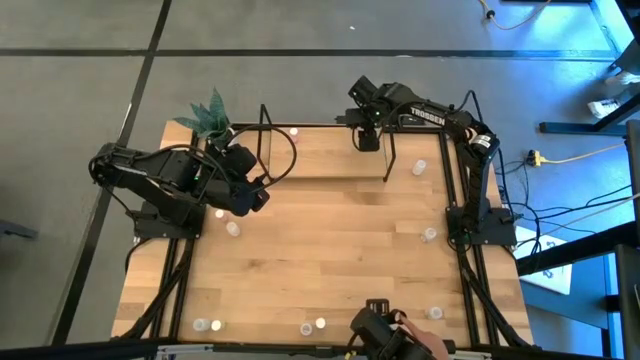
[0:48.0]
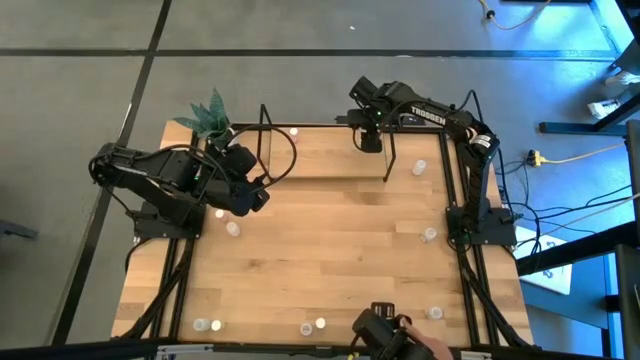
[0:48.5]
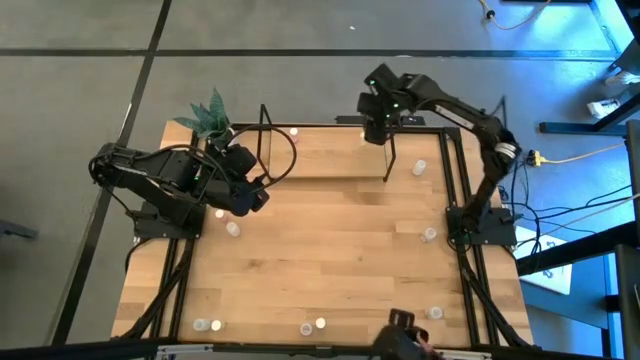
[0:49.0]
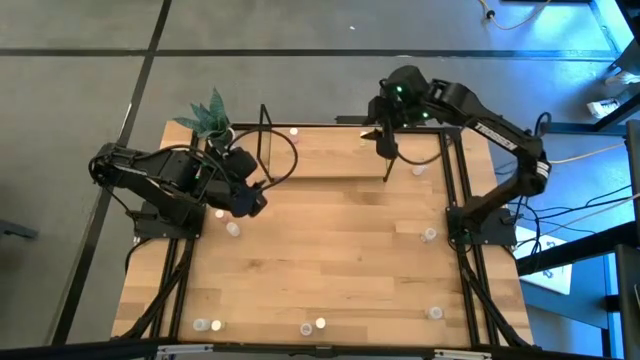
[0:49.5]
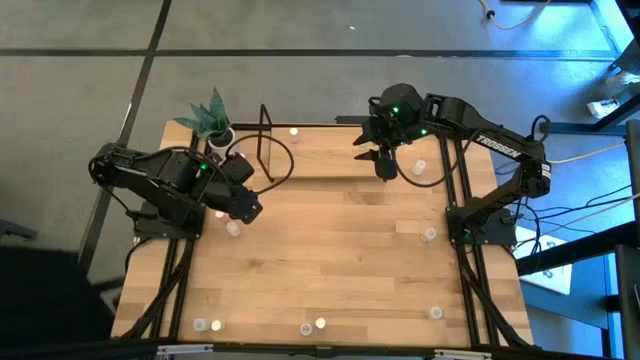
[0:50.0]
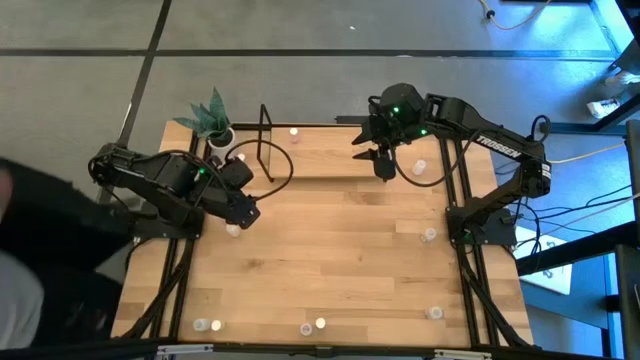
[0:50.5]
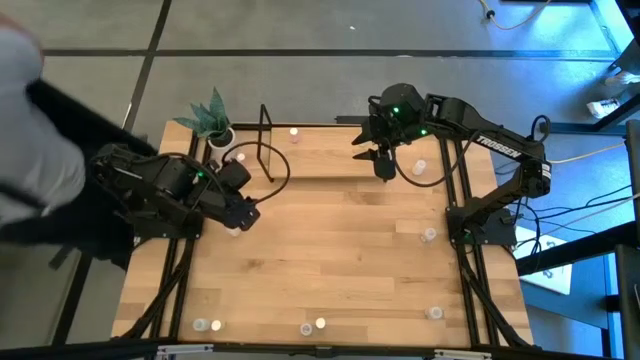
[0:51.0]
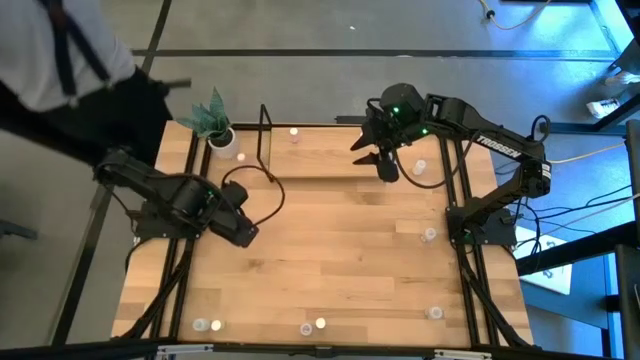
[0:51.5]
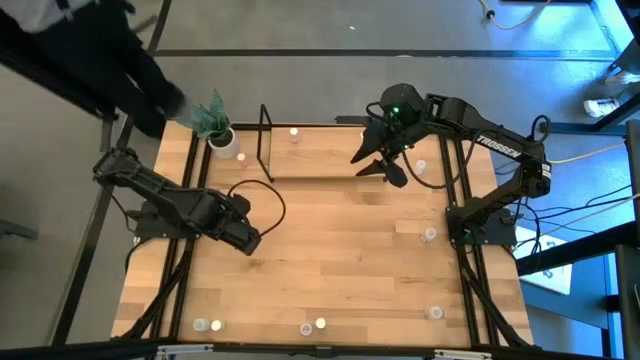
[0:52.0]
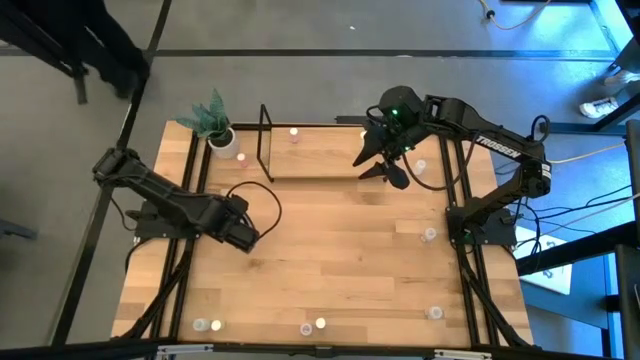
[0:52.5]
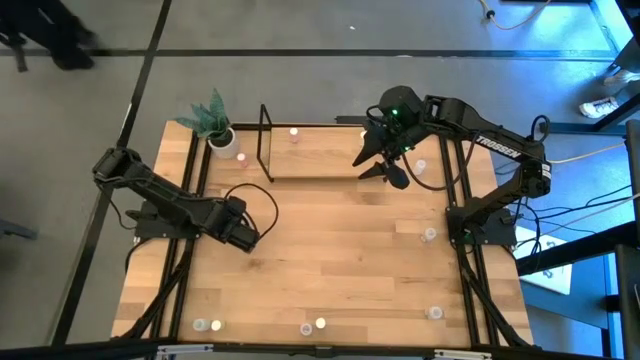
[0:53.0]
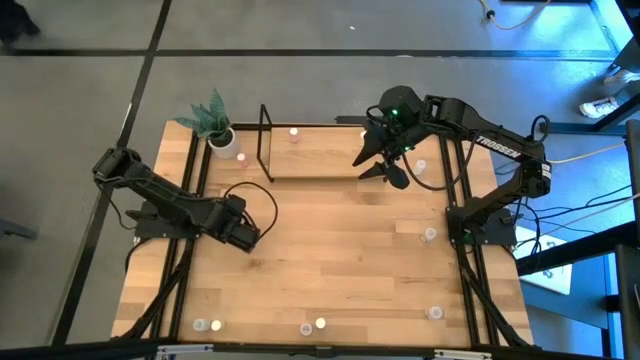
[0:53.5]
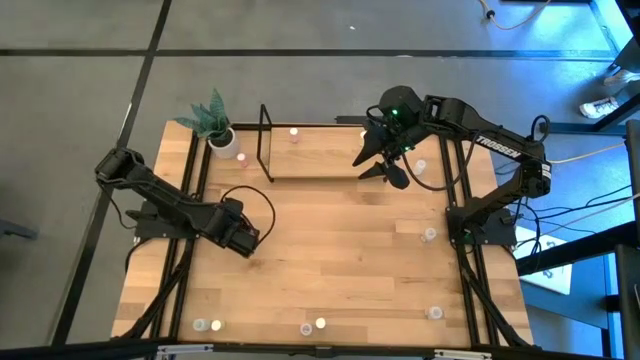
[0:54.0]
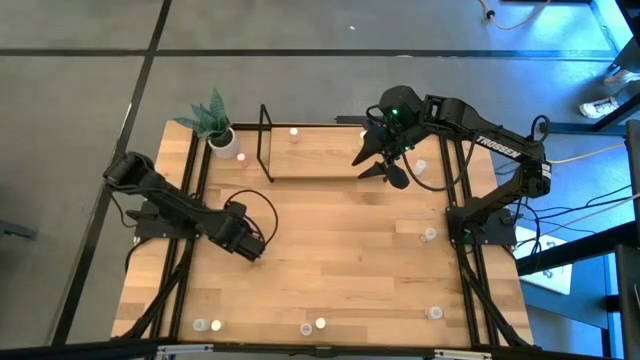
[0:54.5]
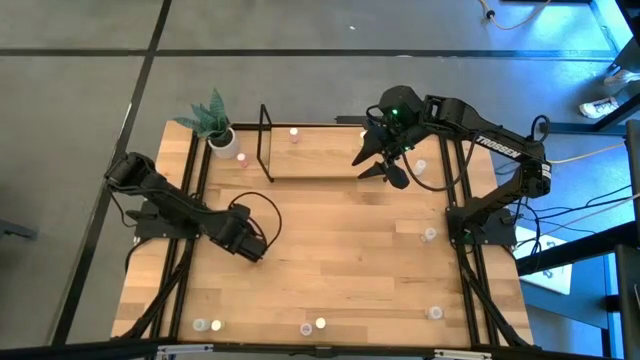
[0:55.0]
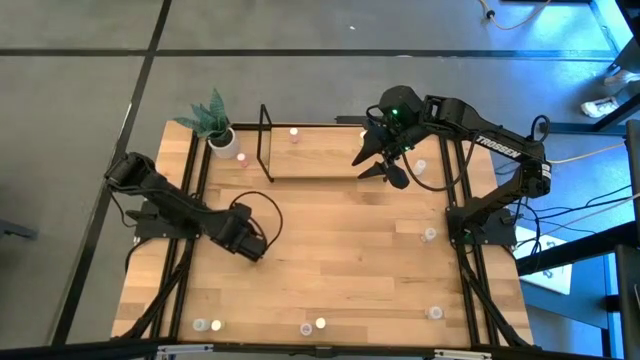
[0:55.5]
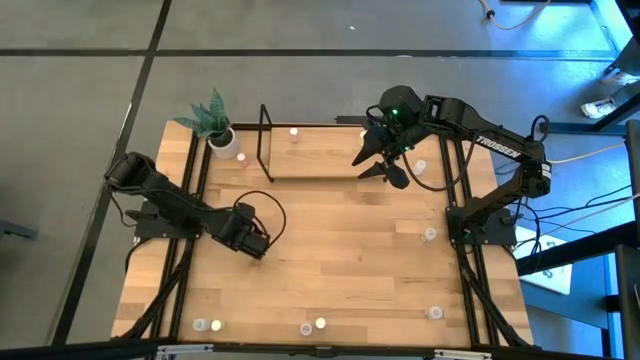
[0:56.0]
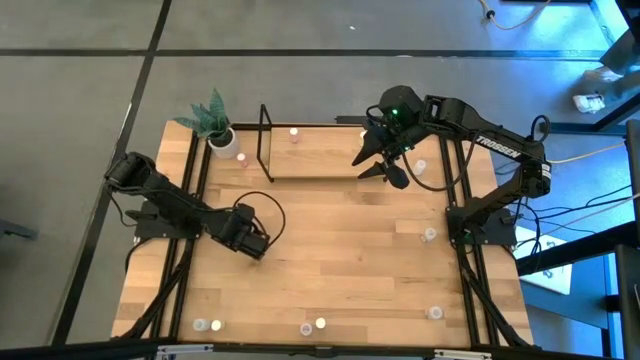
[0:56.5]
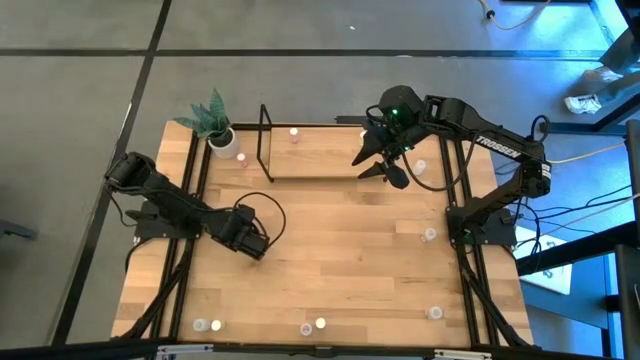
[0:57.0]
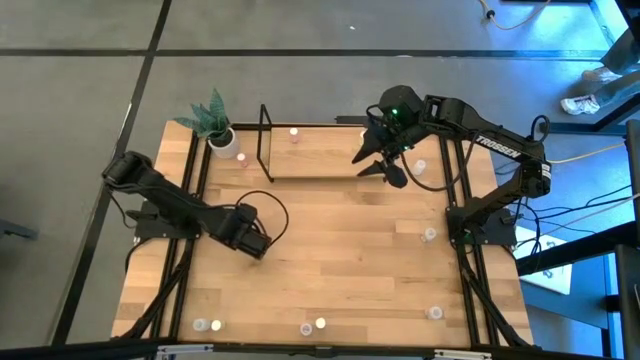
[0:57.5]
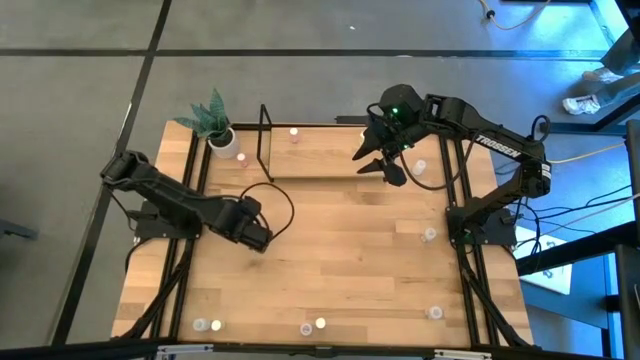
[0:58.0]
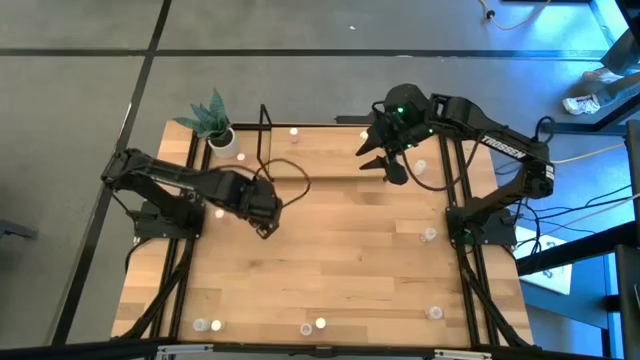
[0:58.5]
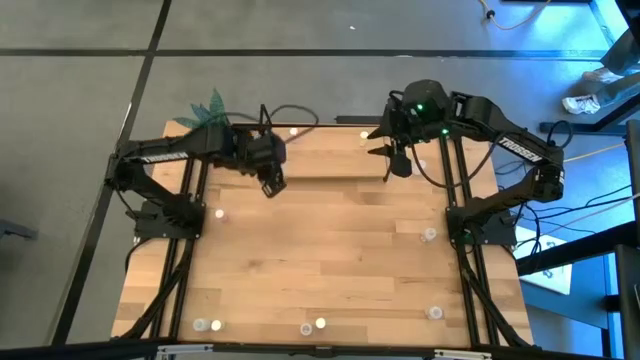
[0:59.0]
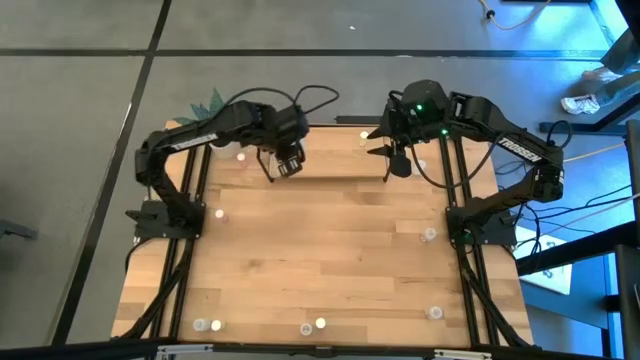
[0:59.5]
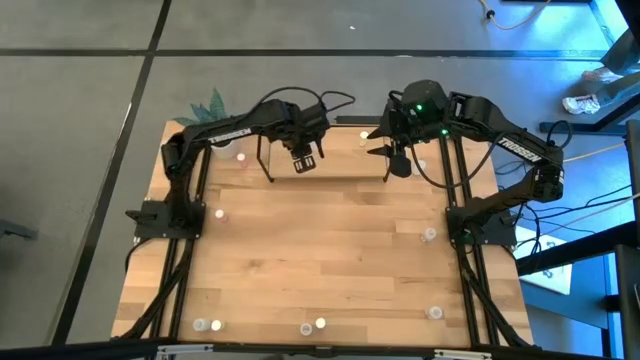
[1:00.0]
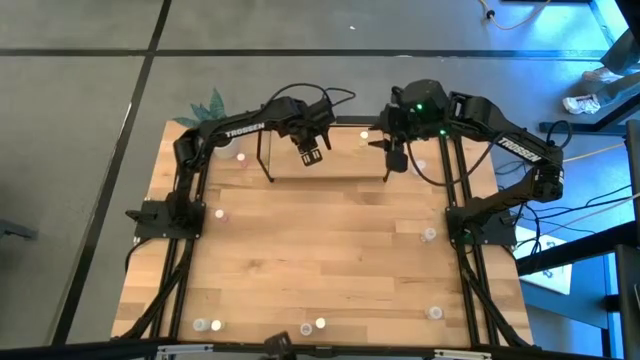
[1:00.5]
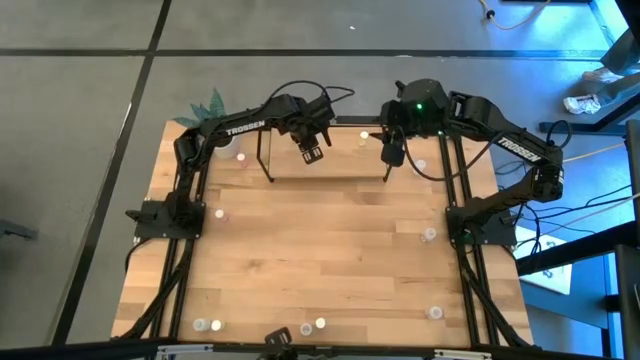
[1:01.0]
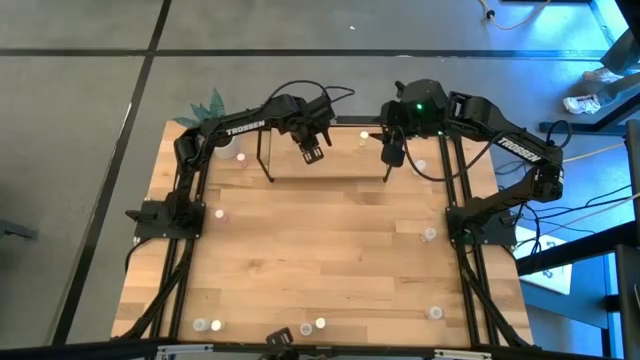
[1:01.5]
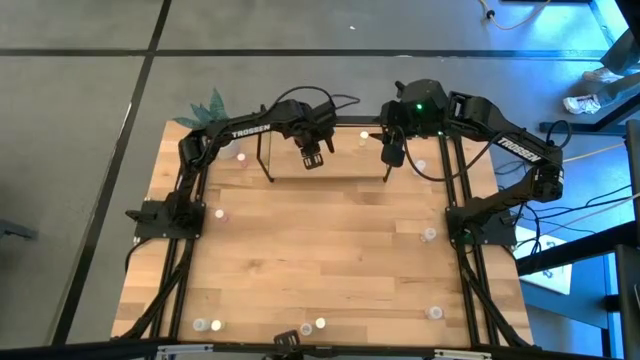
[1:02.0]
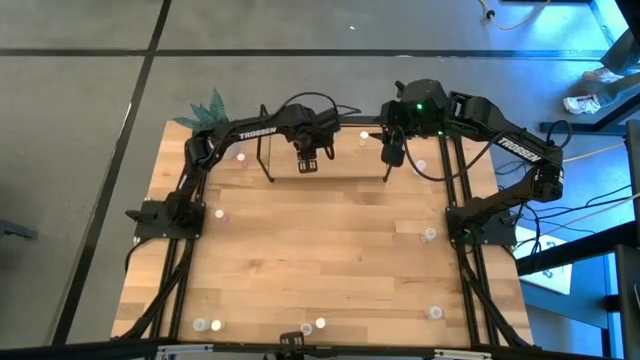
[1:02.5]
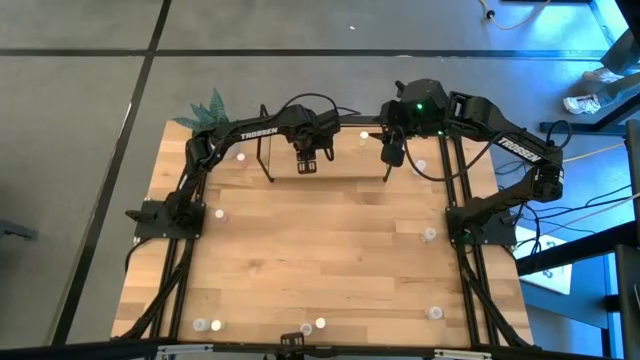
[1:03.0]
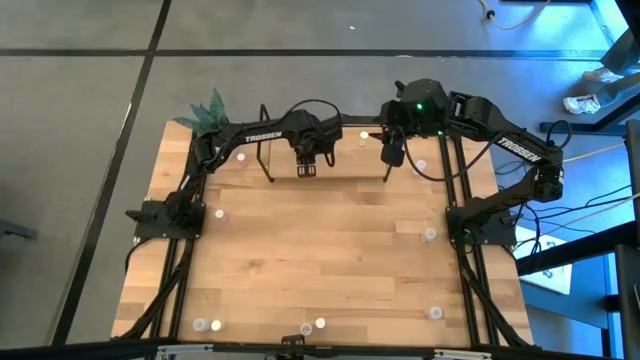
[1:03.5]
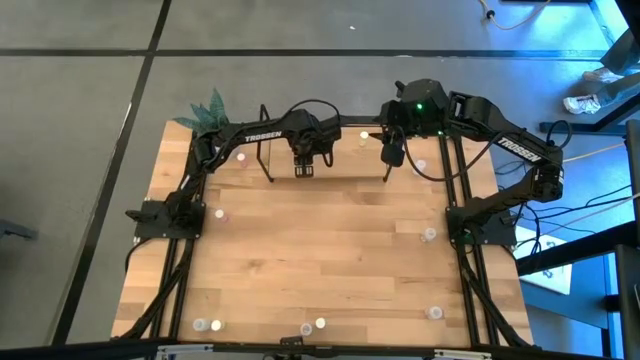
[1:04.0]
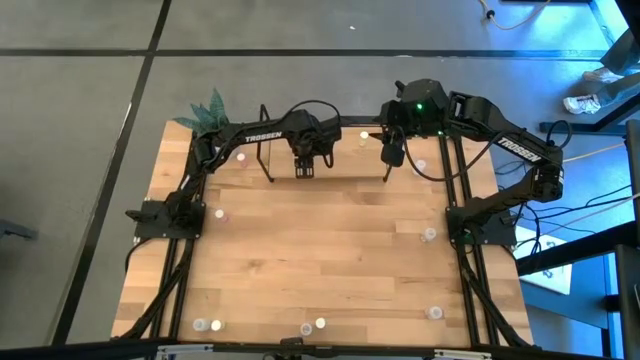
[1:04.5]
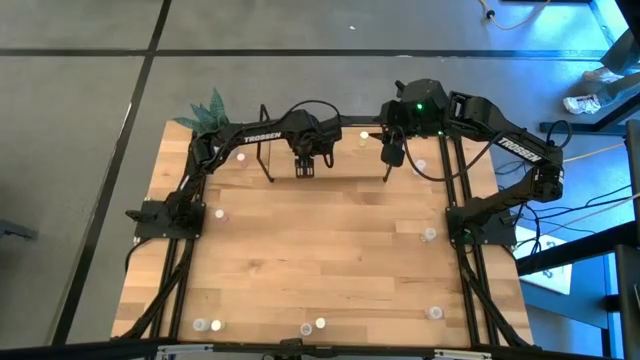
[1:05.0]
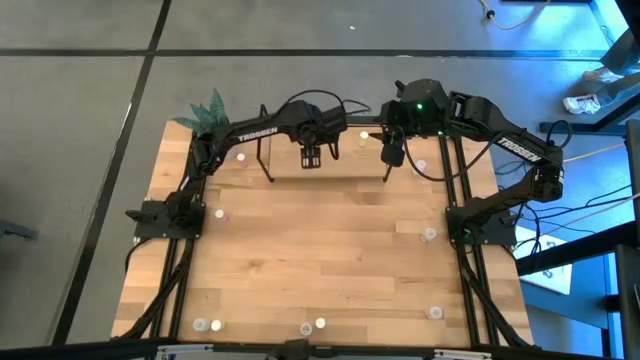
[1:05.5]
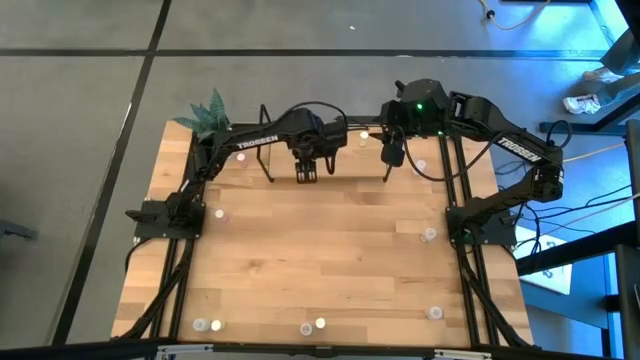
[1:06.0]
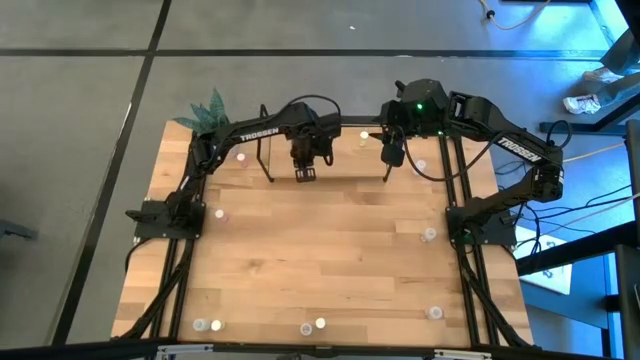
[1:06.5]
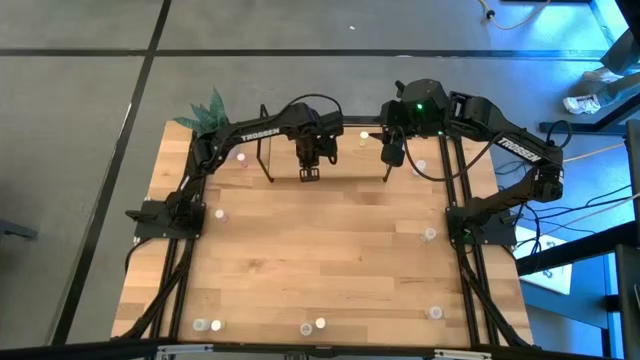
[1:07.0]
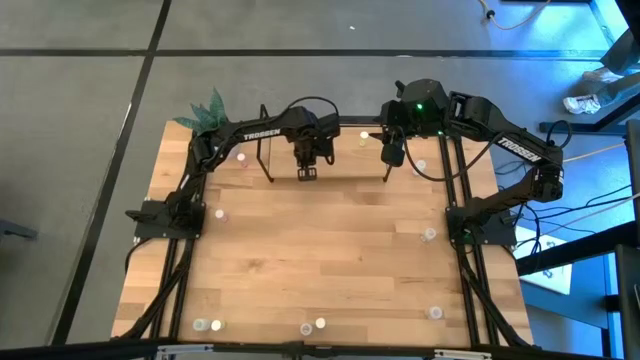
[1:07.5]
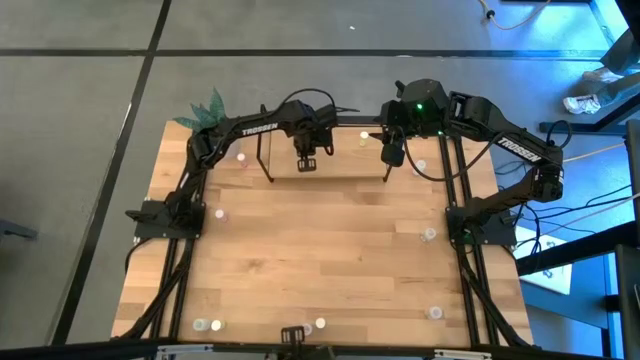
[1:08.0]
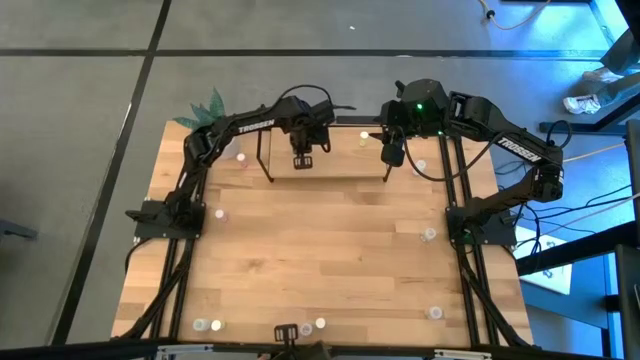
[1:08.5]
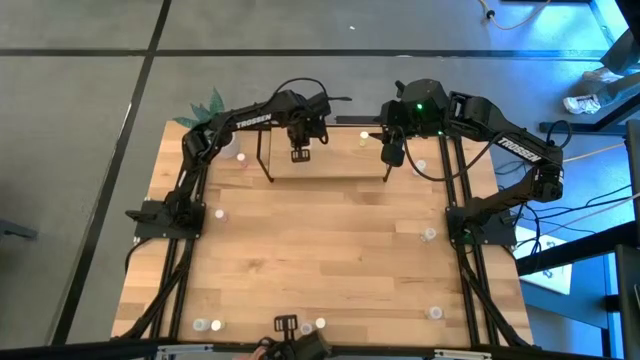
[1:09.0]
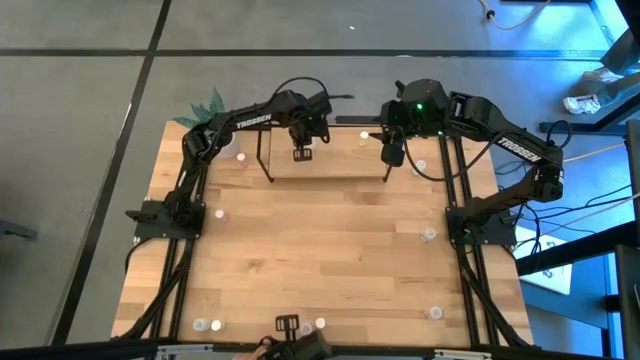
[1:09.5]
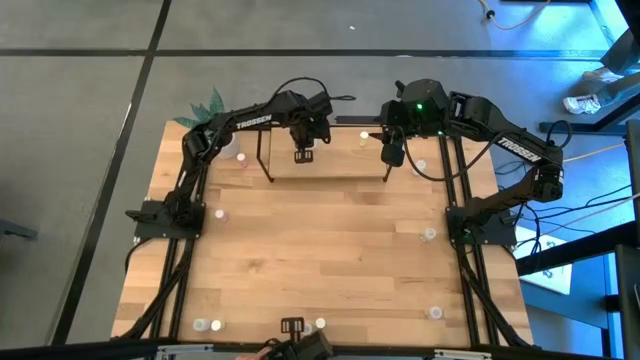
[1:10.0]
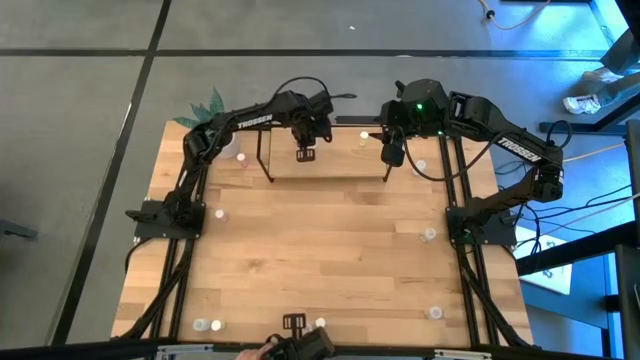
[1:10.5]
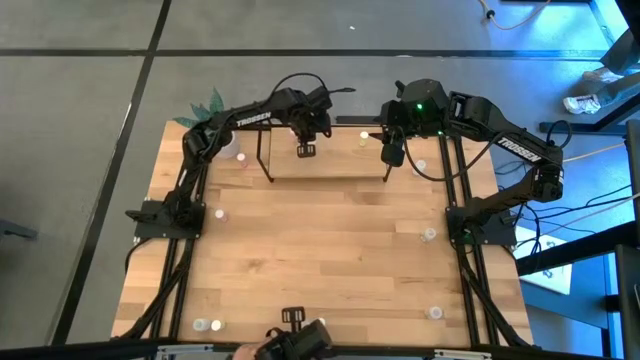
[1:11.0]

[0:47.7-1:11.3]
Task: Pick and place medicine bottles onto shelf by color
Put the middle white pill bottle on the shelf
